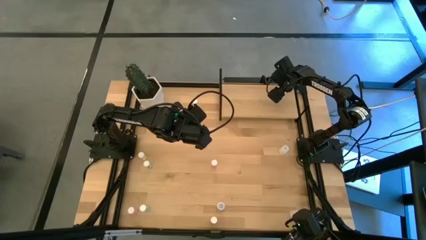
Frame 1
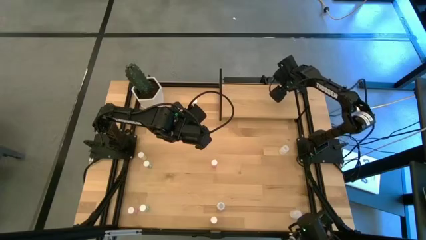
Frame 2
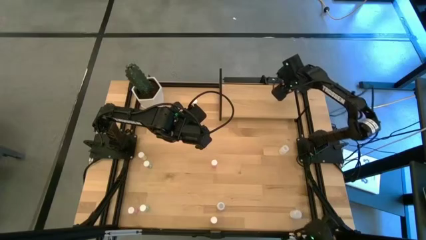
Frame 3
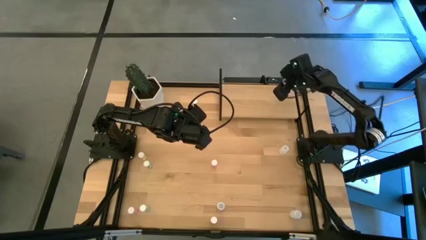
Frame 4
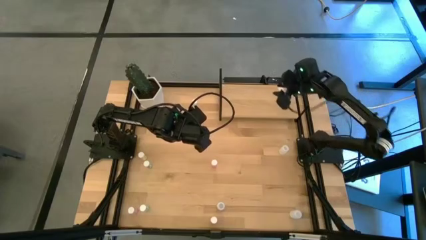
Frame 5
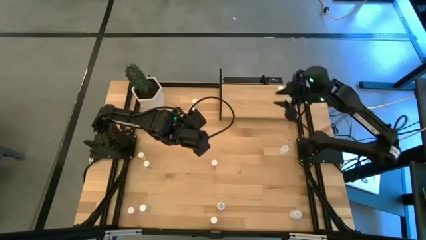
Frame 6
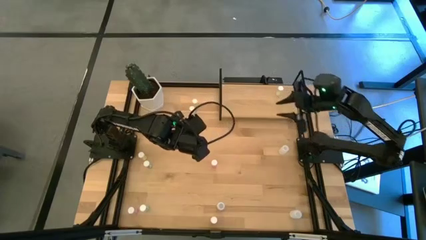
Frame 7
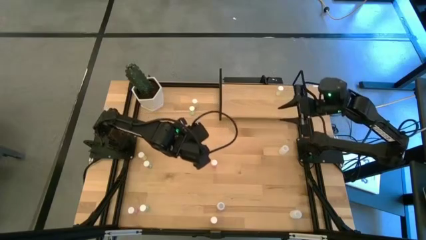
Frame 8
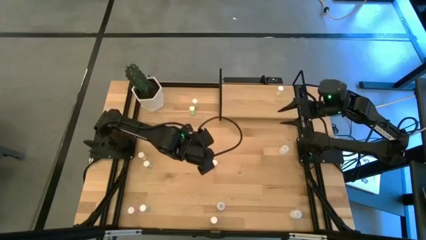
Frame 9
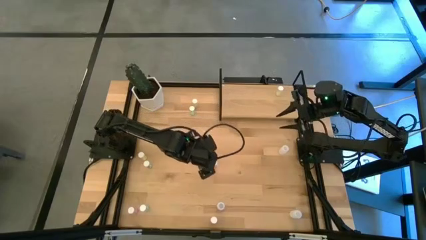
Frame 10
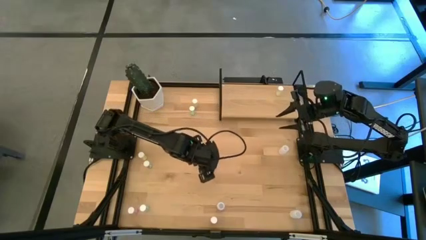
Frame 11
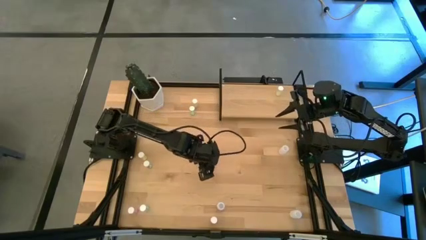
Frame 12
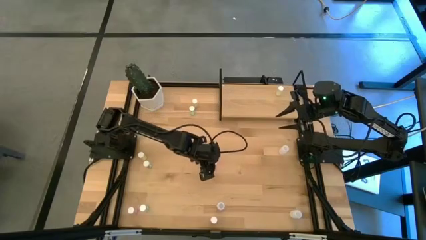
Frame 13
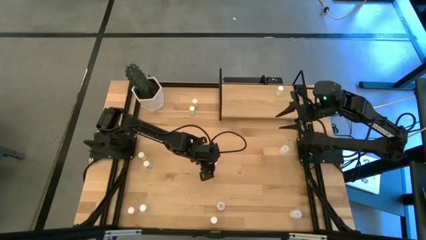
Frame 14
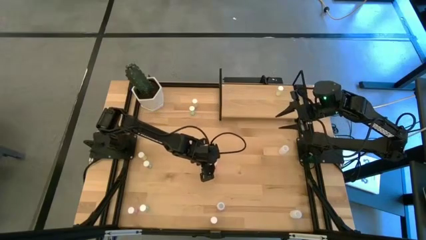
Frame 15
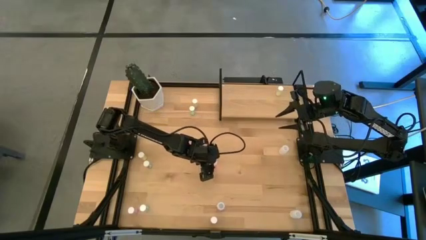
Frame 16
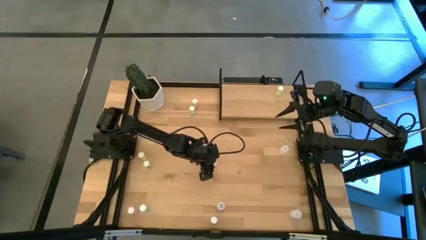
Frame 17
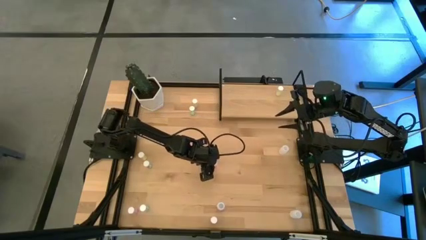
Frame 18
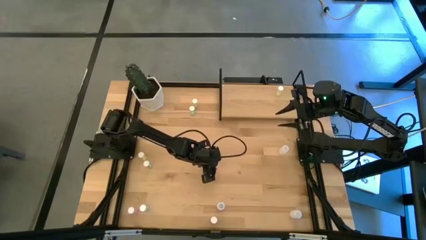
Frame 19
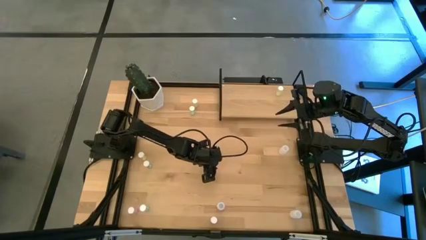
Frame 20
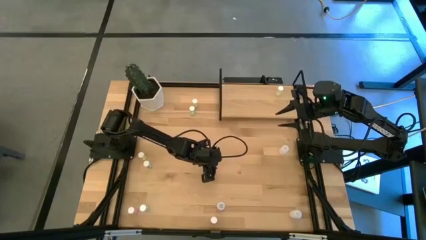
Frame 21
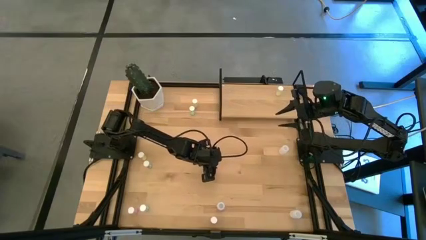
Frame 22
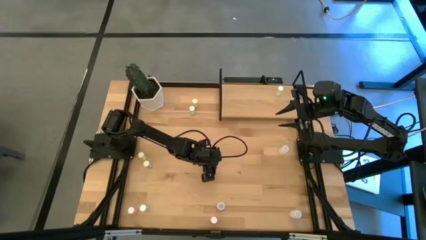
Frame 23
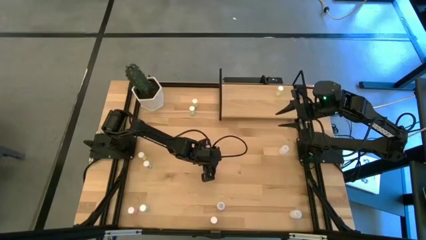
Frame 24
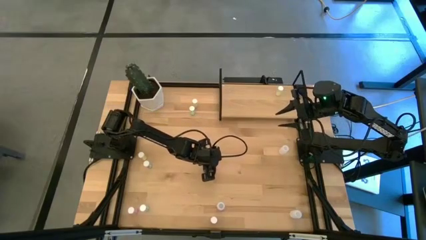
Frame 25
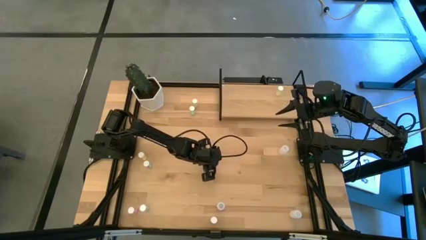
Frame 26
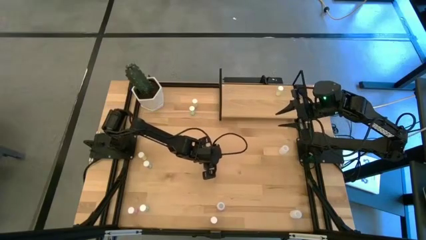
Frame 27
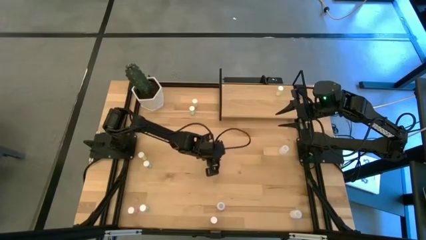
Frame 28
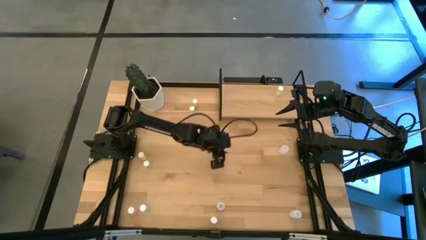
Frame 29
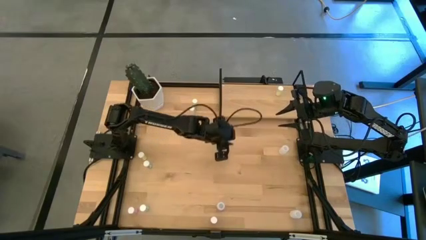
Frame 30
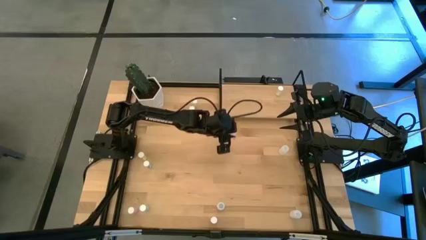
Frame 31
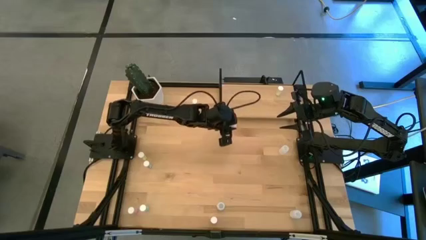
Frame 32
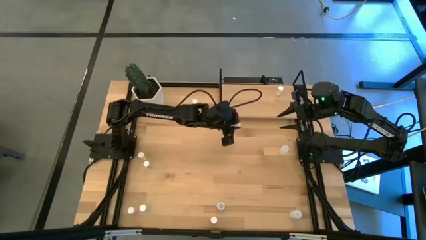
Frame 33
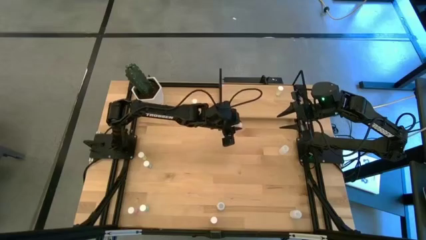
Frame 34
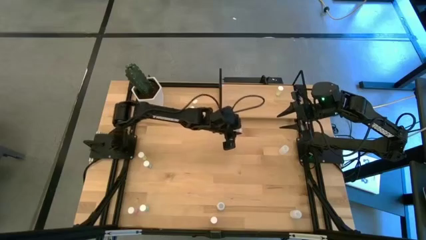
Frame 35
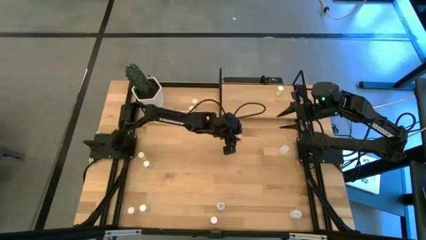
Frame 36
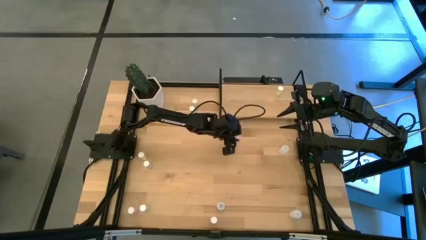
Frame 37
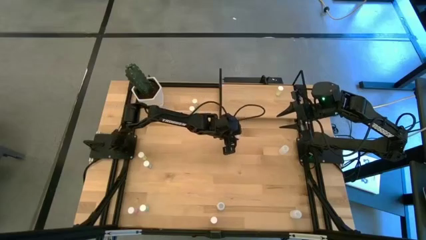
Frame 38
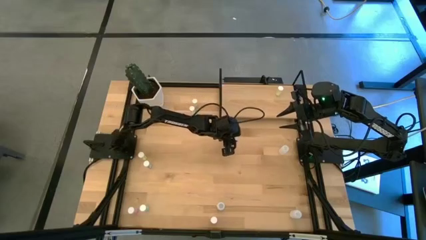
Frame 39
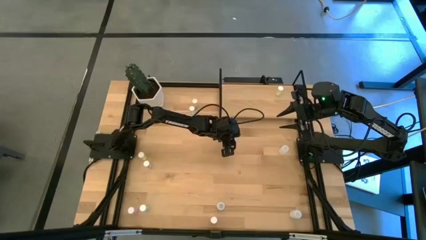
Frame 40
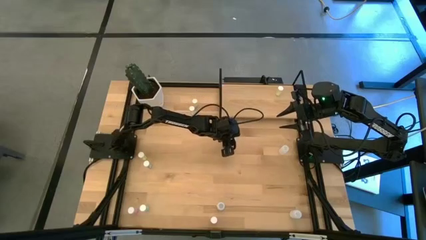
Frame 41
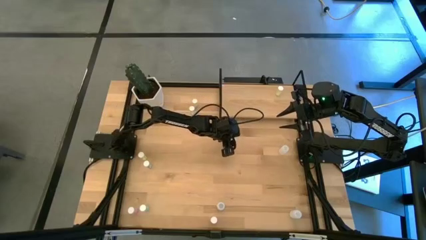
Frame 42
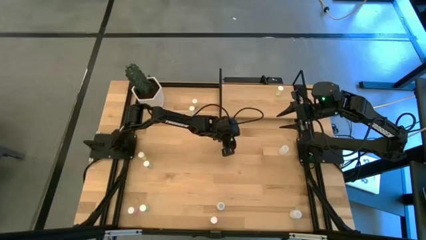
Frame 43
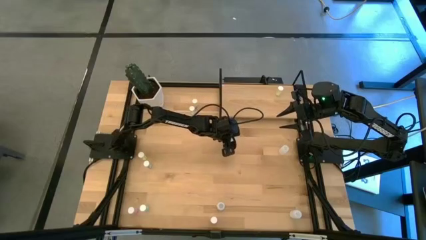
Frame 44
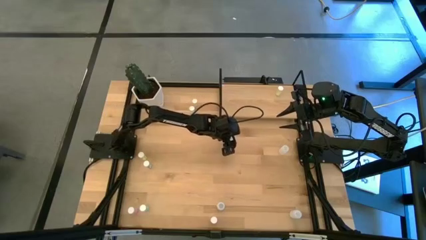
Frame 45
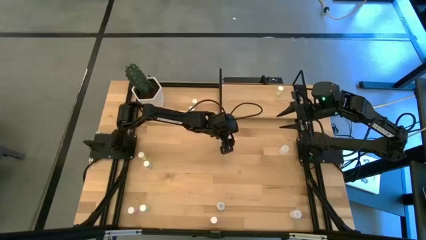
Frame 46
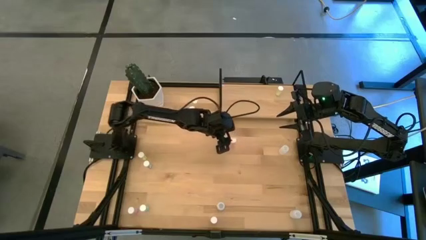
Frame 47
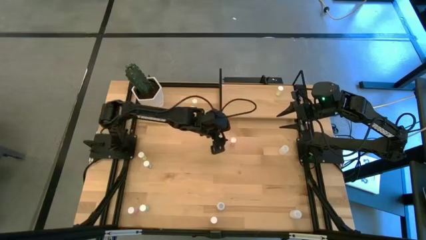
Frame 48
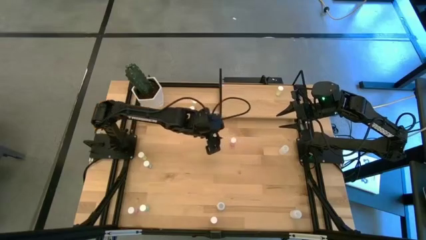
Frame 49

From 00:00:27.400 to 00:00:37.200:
Task: Pick and place medicine bottles onto shelf by color
Put the top pink pill bottle on the shelf

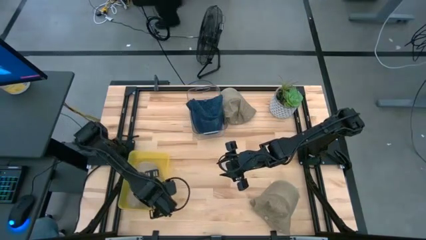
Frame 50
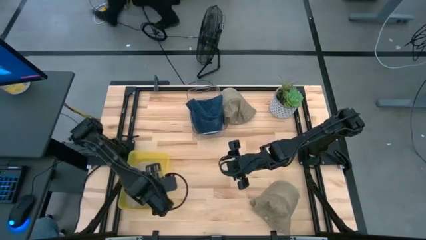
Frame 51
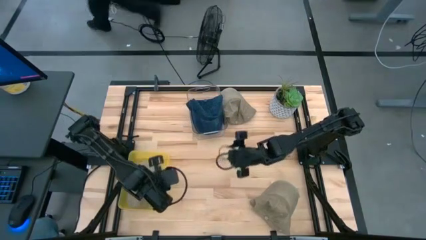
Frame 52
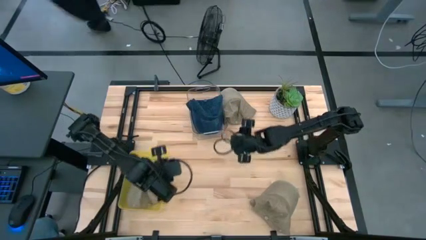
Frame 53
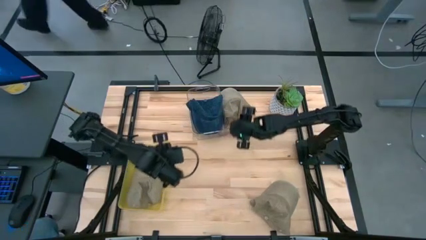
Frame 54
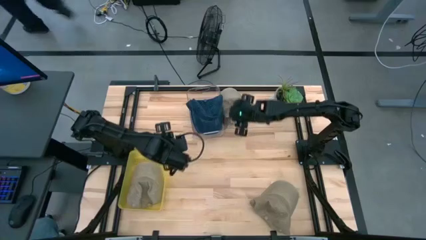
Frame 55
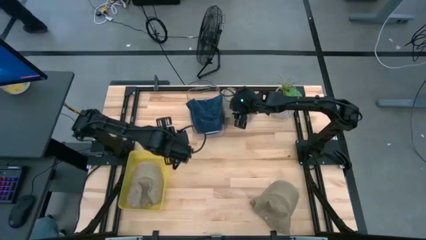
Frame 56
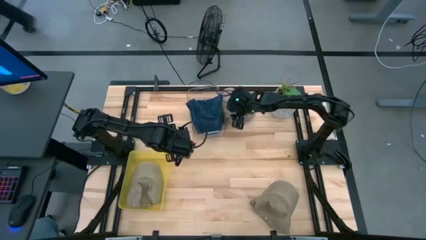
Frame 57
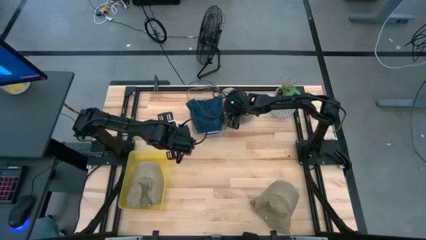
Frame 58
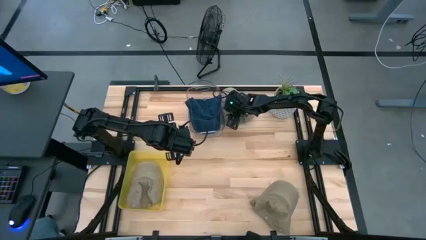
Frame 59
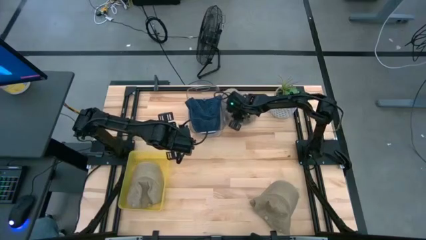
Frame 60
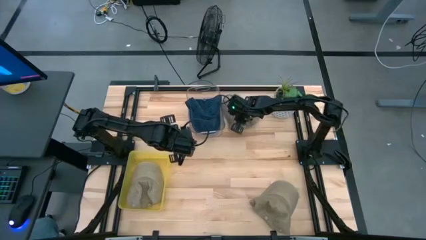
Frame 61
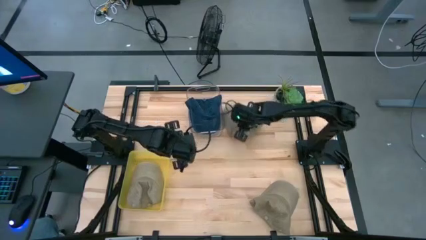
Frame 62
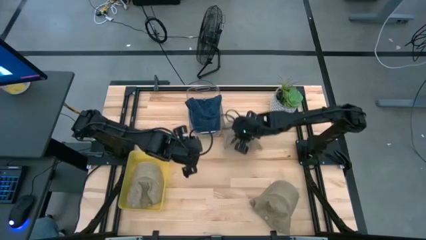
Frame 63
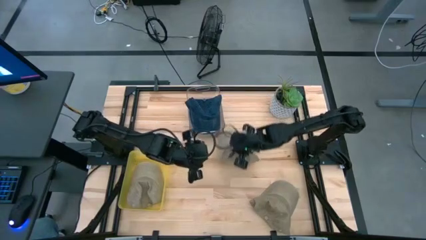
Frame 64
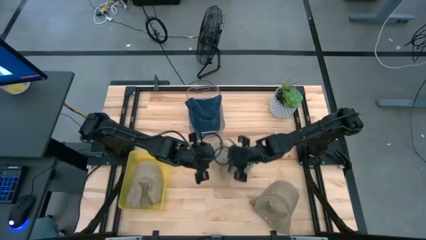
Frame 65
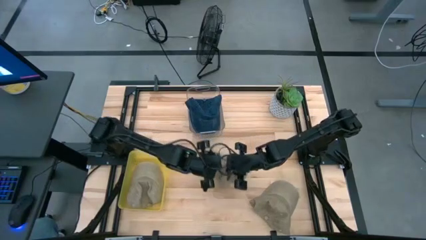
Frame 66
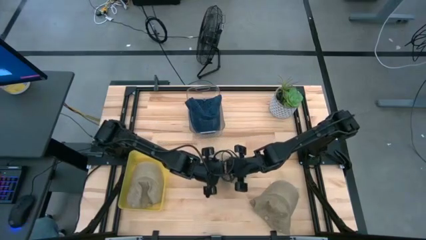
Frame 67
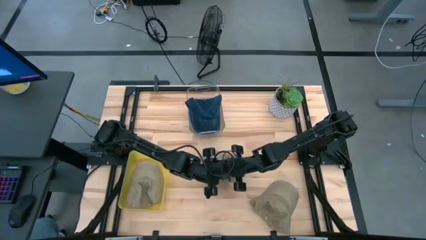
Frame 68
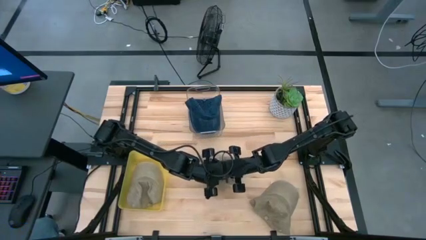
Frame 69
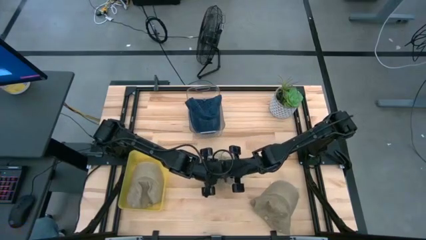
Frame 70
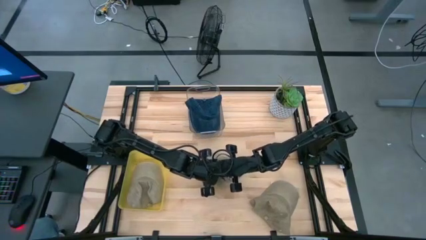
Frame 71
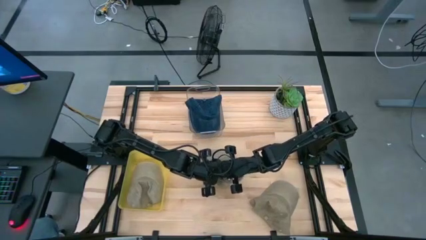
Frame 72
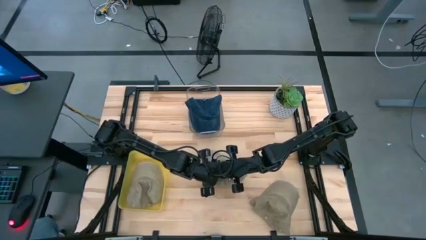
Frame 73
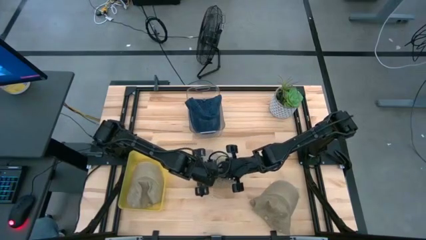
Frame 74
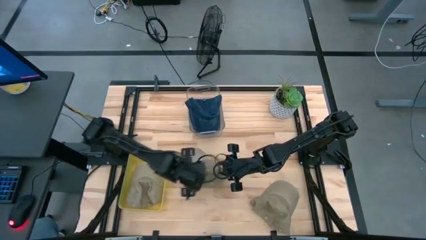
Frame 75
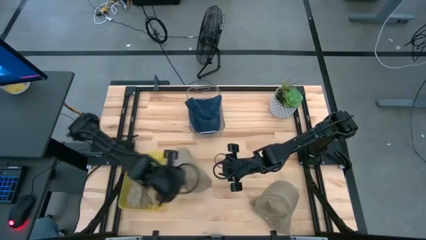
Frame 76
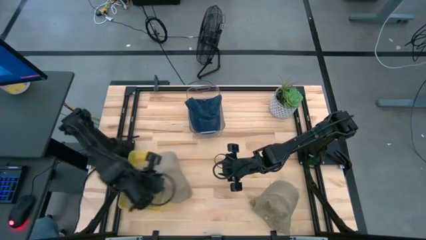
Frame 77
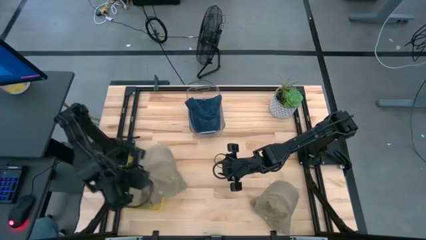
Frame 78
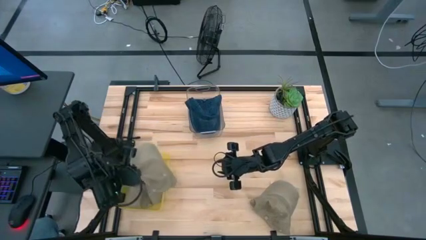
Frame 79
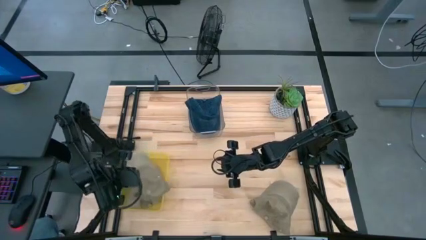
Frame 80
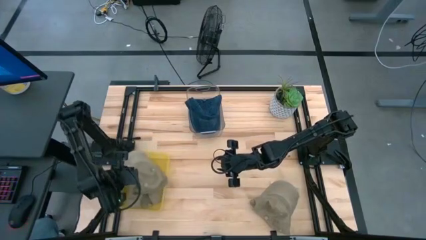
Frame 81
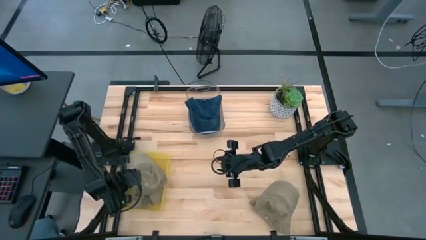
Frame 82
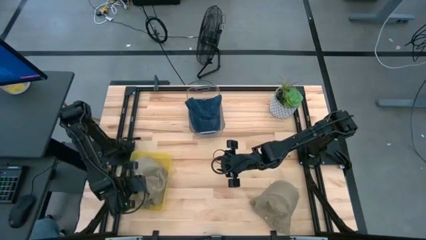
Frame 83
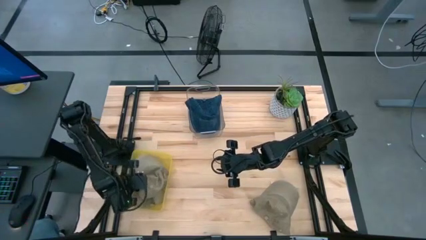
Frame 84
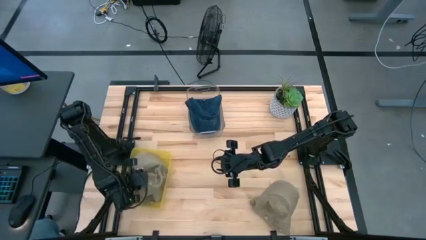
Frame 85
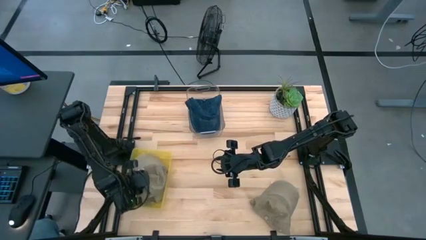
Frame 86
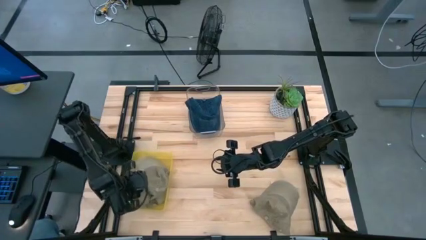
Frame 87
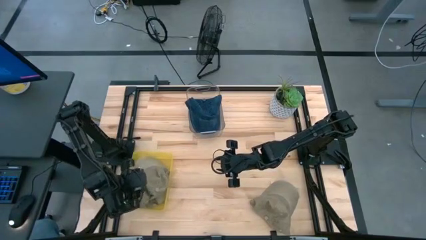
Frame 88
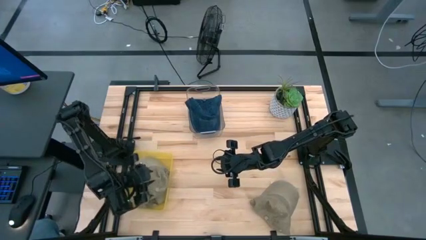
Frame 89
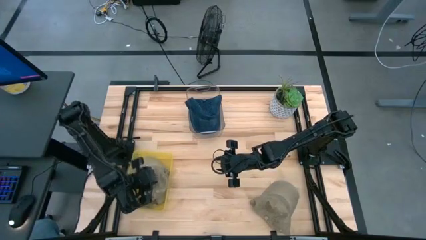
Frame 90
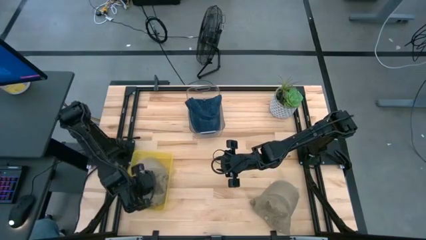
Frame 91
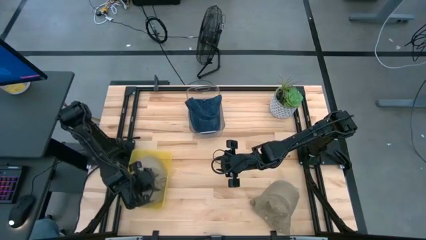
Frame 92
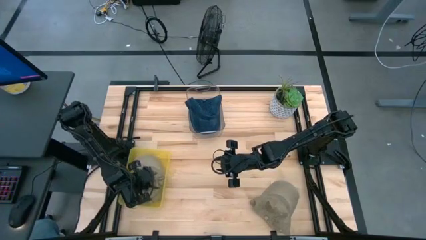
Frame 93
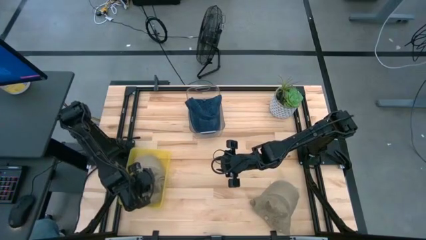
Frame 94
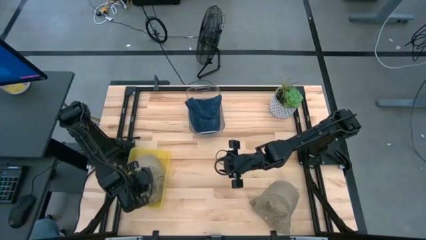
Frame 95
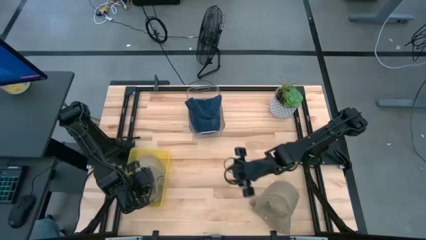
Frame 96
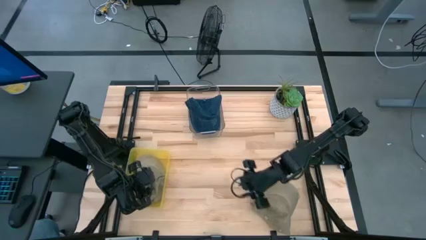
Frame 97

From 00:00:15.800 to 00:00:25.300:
Task: Pick & Place hat
Put the top brown cap into the yellow bin
